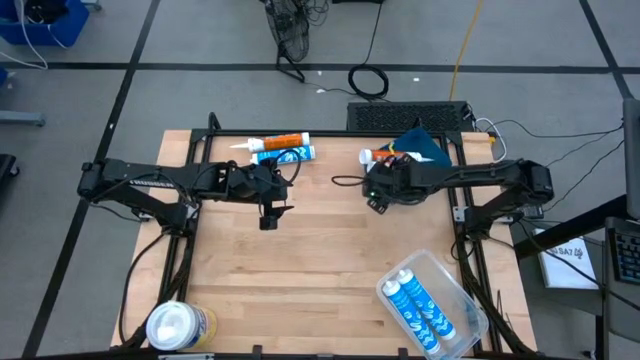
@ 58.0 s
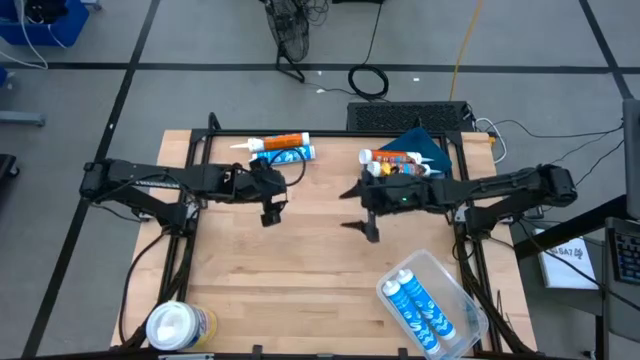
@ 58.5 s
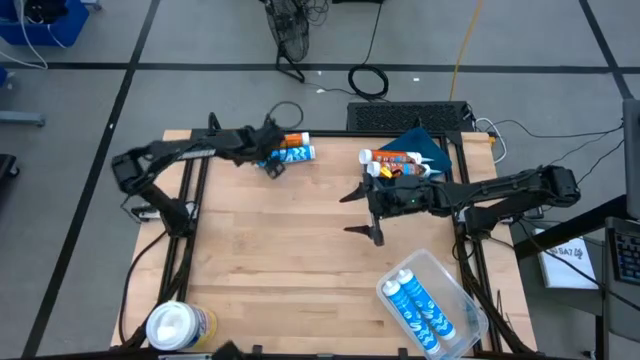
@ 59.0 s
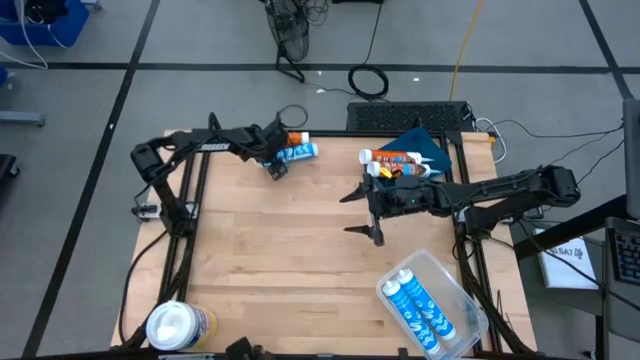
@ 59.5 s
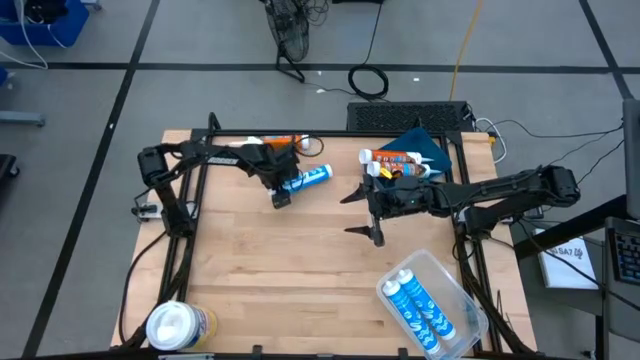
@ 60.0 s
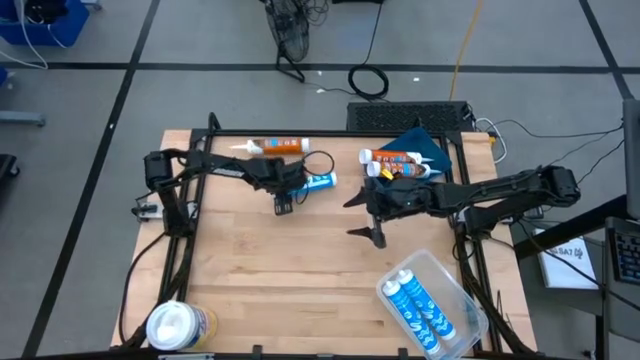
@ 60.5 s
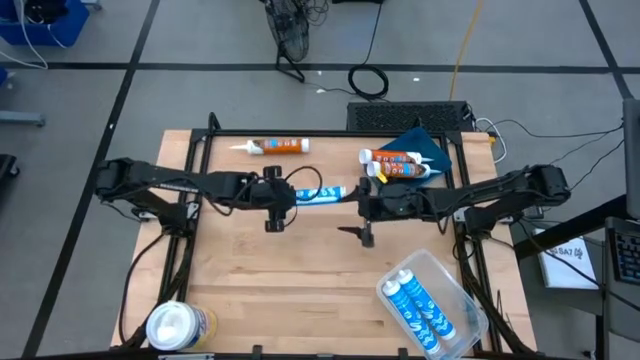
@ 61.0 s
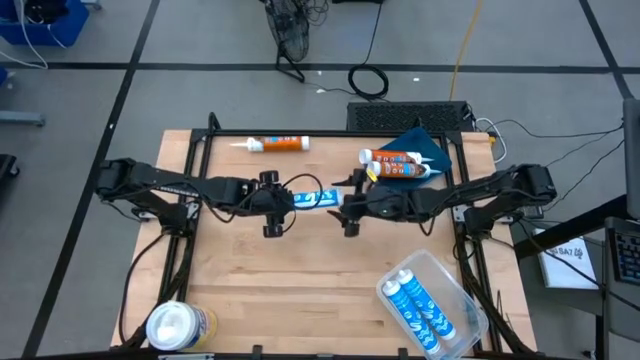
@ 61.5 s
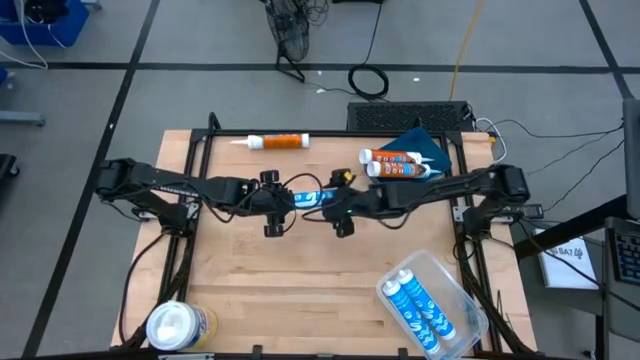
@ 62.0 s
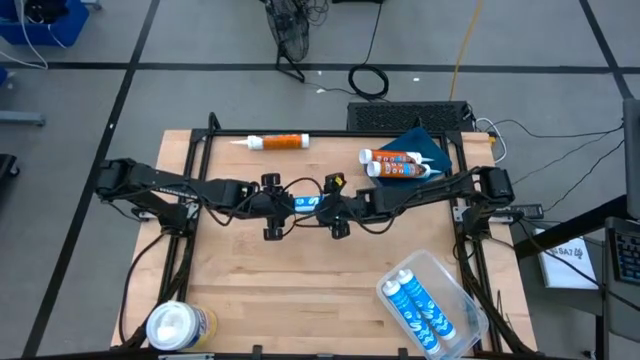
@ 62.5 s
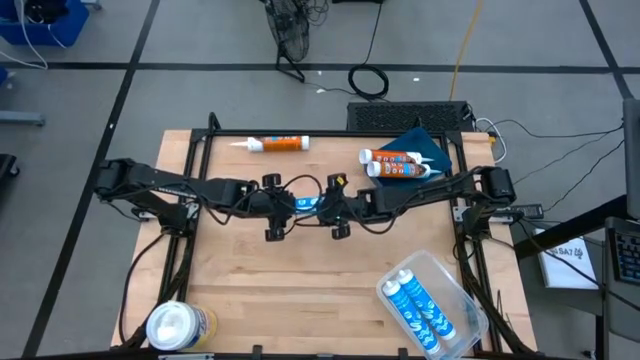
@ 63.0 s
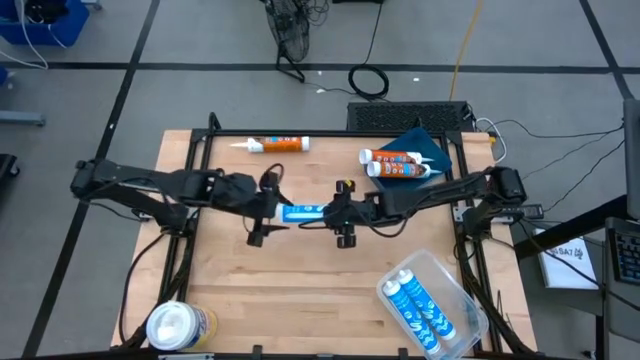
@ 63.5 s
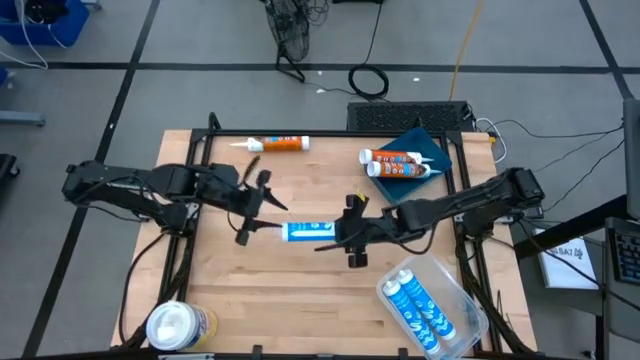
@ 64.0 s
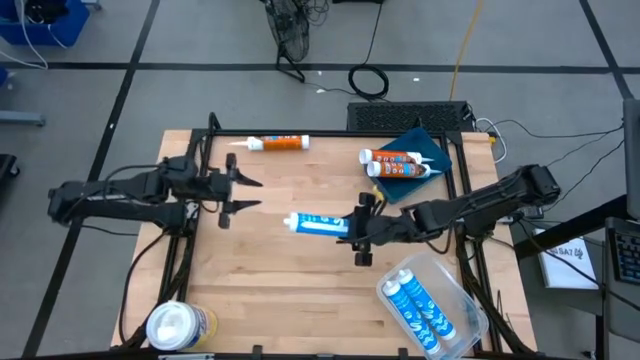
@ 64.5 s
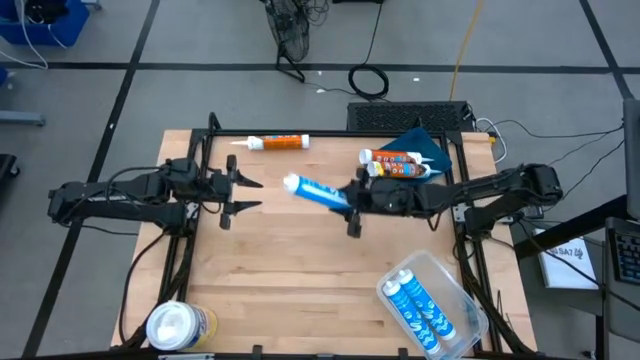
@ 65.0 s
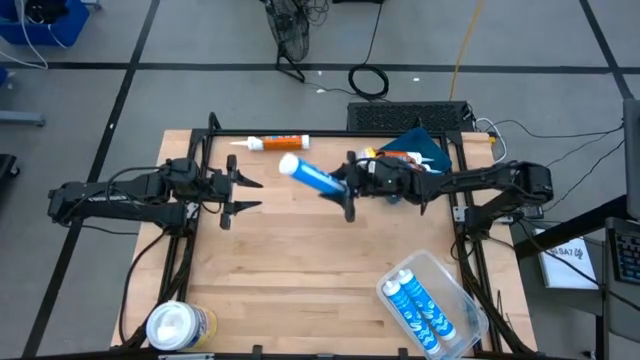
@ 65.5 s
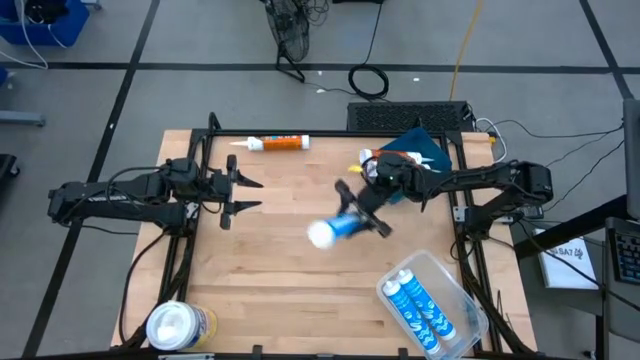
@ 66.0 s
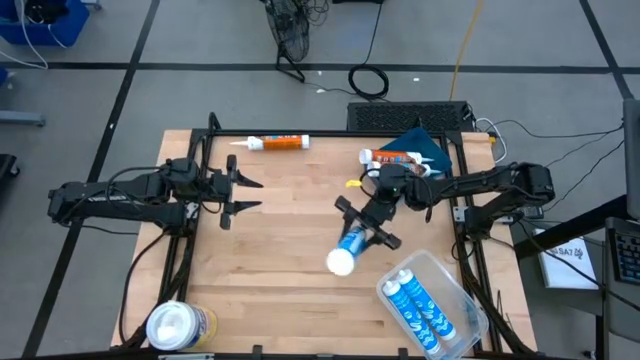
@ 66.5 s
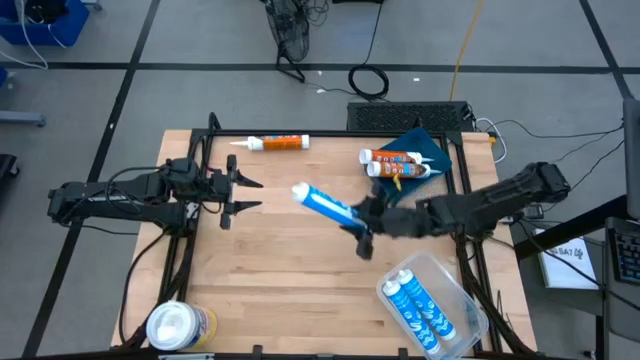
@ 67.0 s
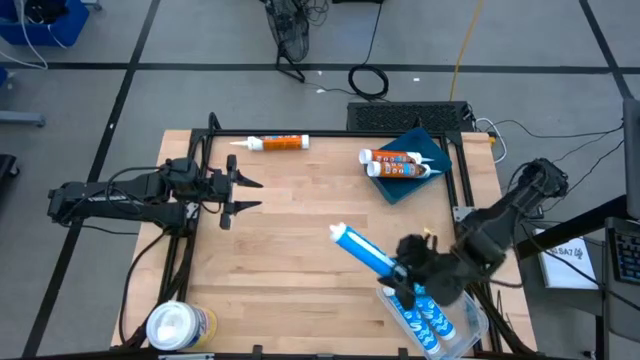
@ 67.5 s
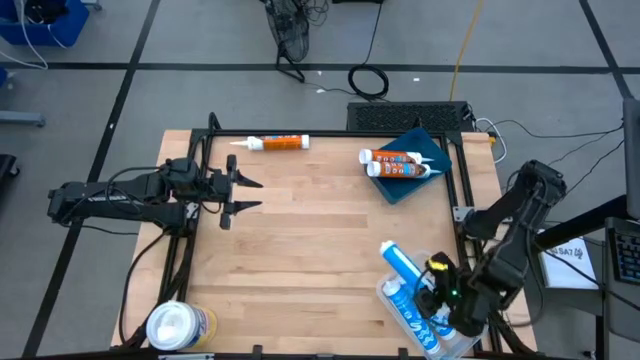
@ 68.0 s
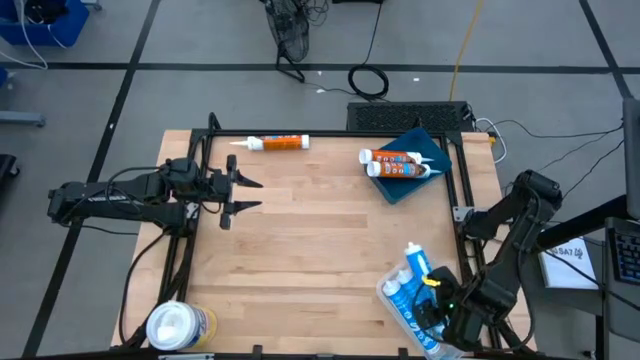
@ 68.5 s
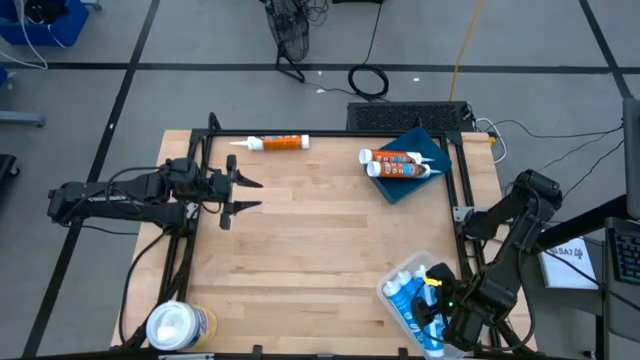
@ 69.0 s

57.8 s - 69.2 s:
Task: Pick & place silicon tubes, Sealant and Lysol wipes
Put the blue sealant into the transparent bin

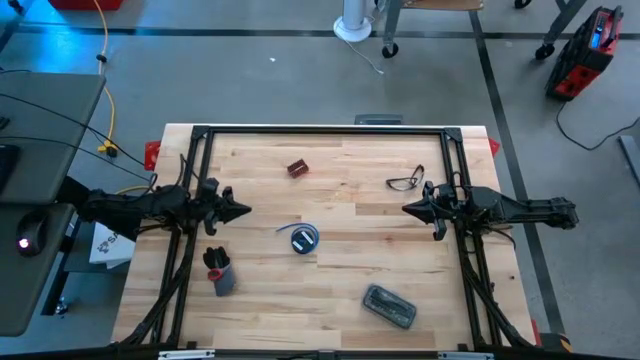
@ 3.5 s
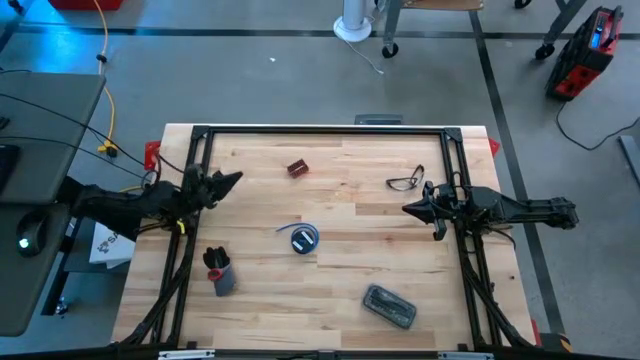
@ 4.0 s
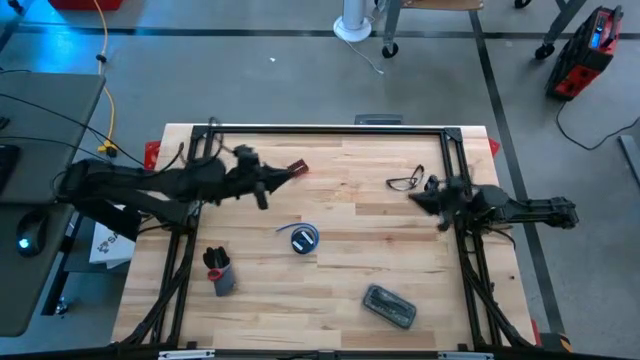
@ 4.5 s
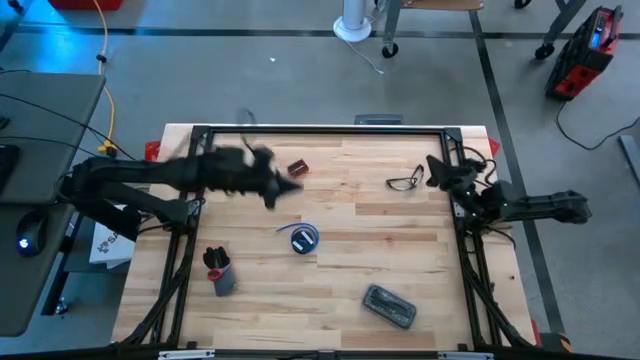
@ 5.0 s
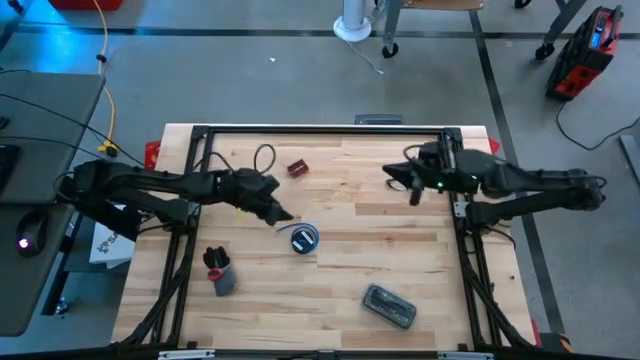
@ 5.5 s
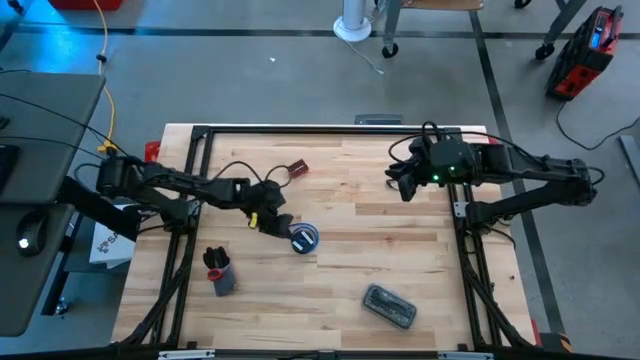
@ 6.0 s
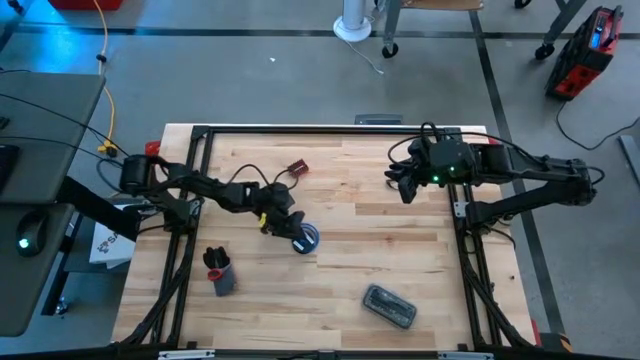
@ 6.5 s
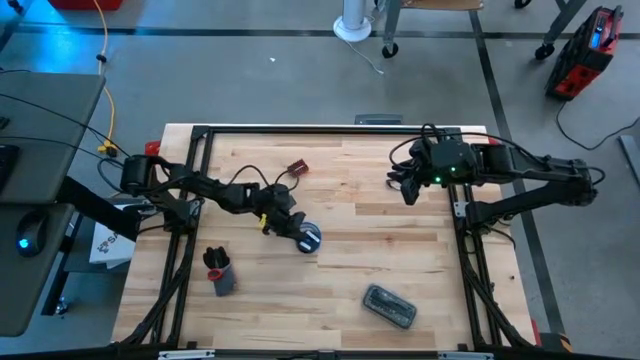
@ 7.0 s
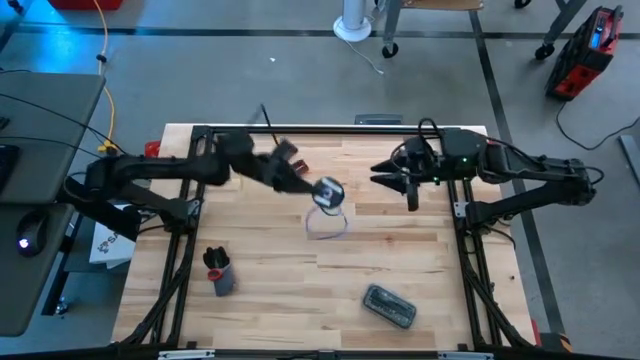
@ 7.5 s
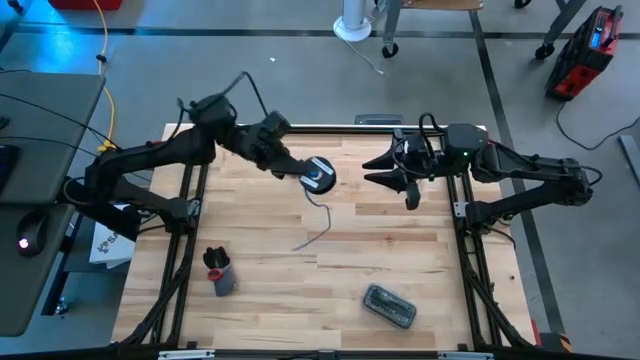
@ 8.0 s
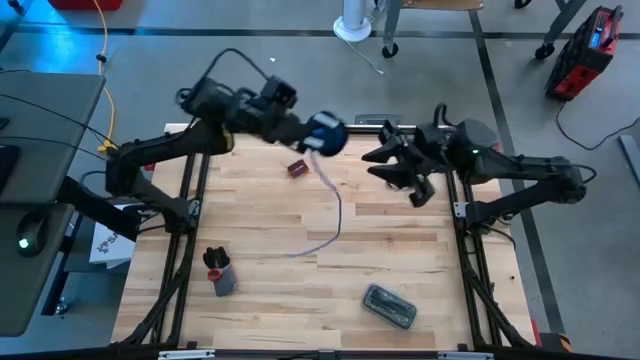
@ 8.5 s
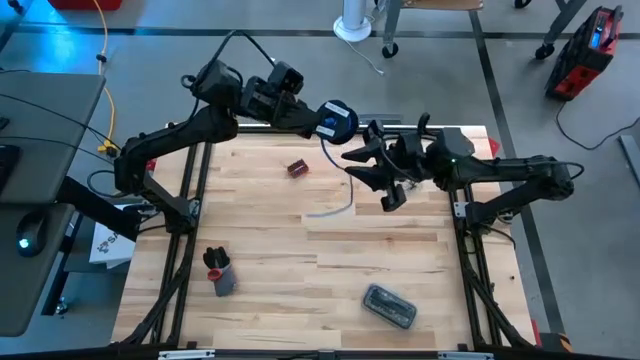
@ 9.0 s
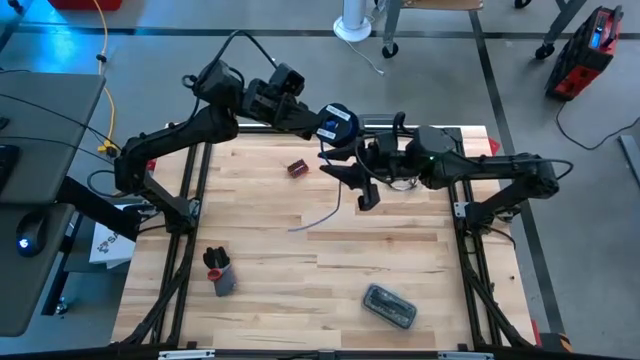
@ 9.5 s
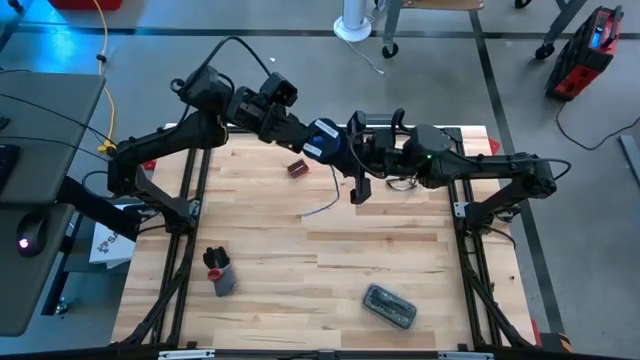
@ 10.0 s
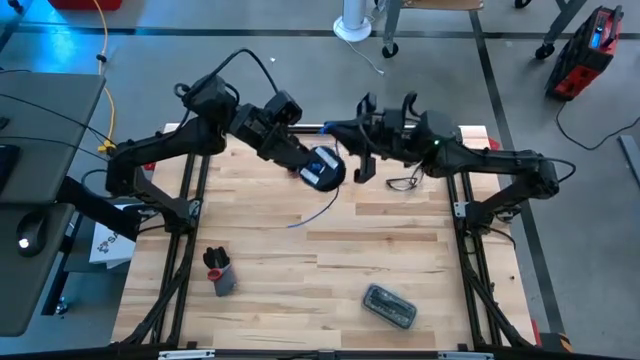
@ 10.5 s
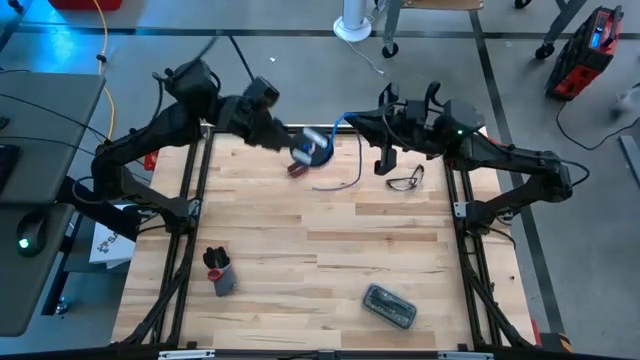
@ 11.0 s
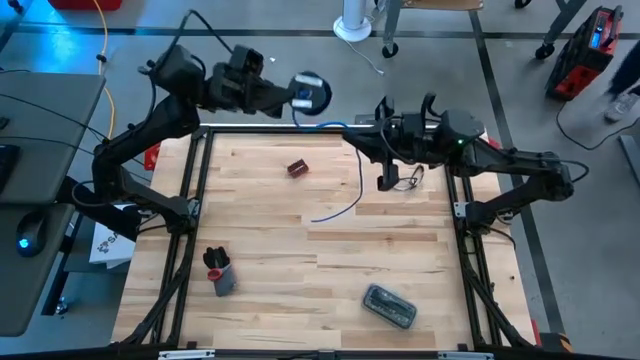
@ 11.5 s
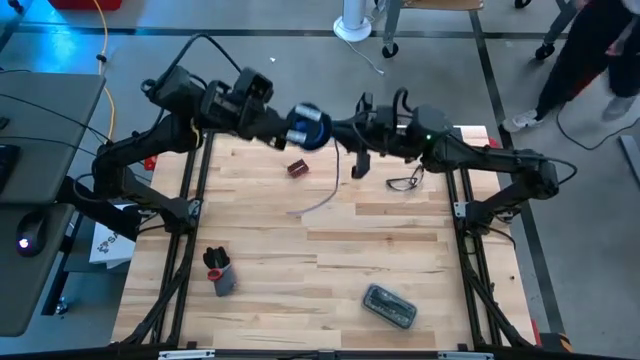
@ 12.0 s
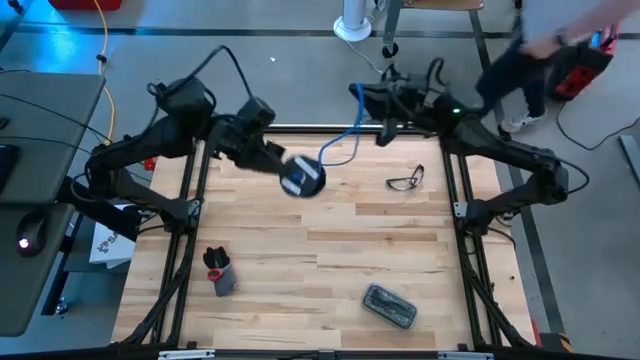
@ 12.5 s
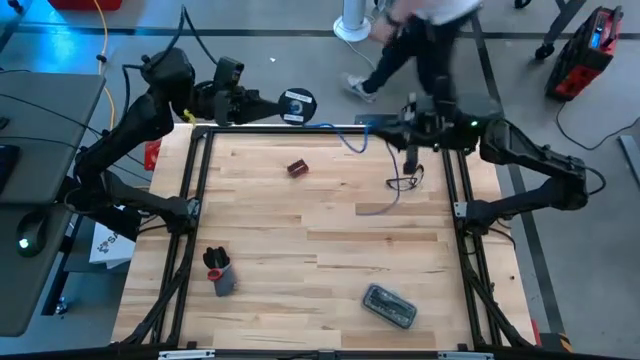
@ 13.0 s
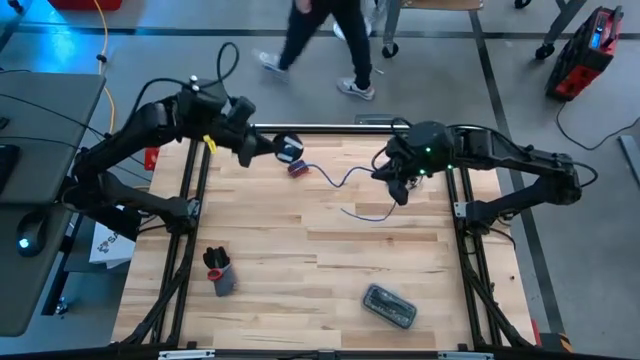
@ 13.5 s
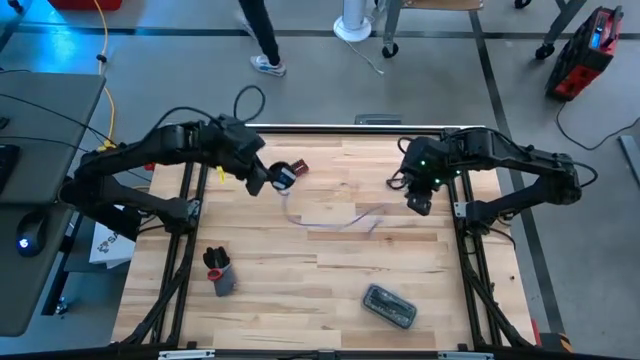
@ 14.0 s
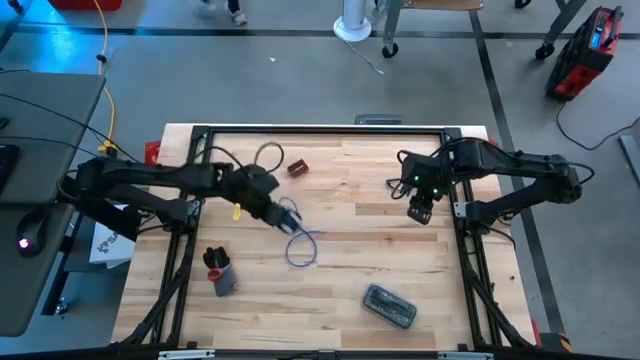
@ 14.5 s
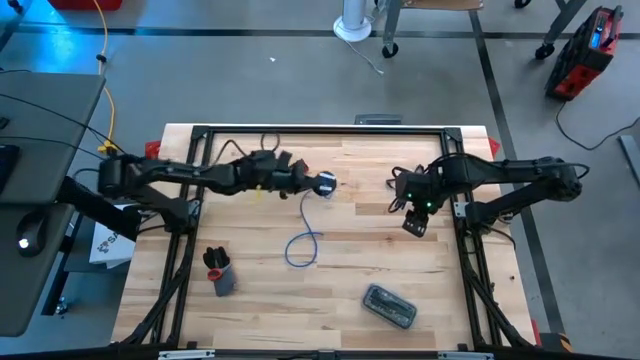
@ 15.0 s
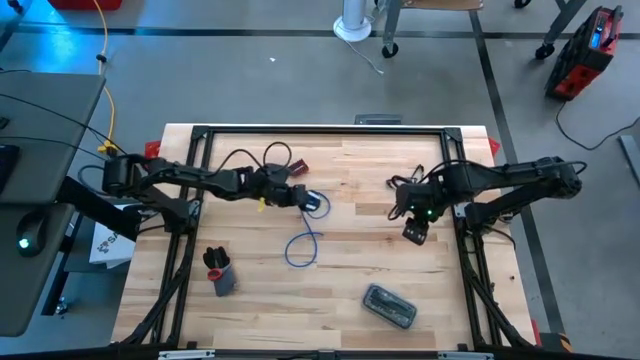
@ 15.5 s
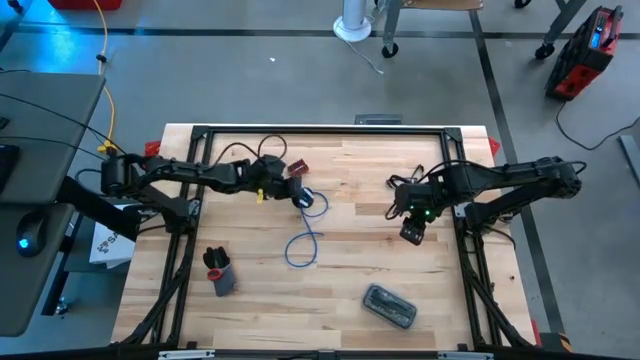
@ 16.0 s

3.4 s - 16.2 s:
Task: Coil cords
Uncoil the blue wire from the spool
